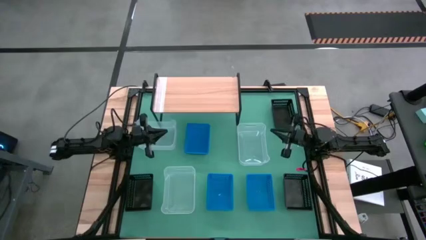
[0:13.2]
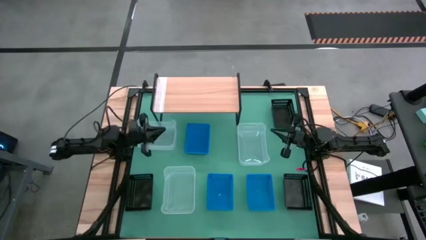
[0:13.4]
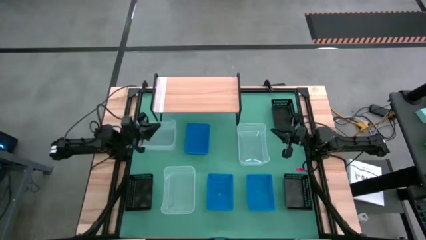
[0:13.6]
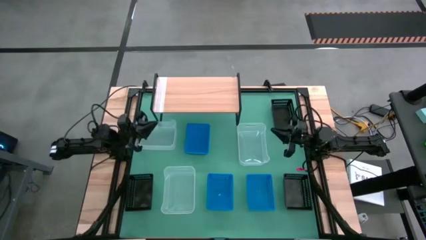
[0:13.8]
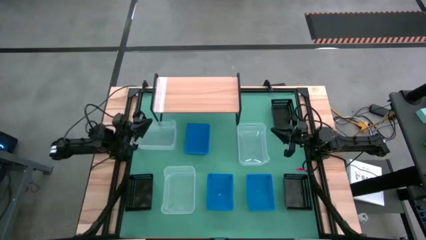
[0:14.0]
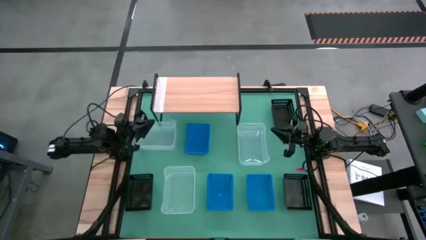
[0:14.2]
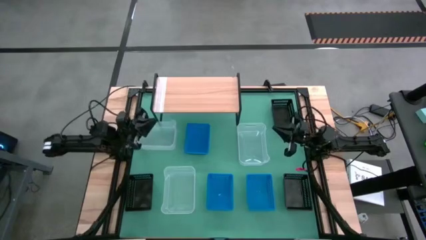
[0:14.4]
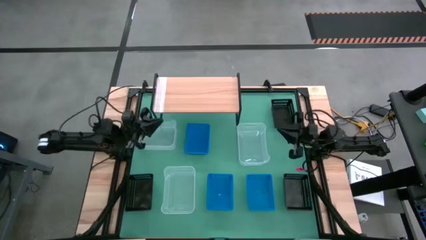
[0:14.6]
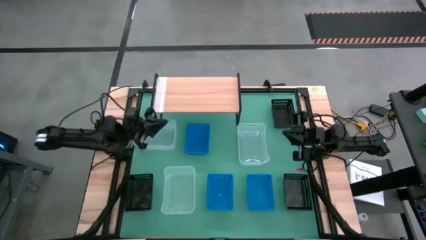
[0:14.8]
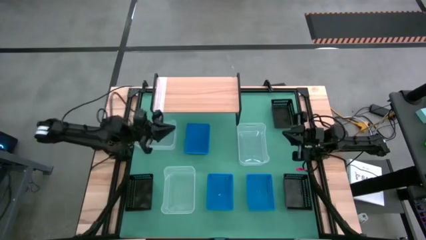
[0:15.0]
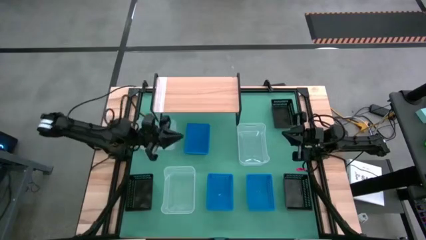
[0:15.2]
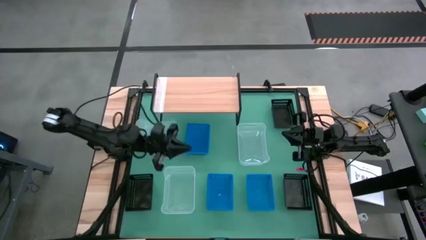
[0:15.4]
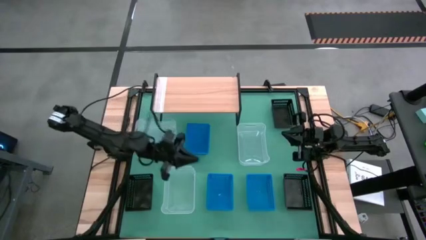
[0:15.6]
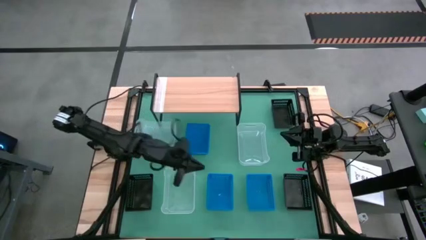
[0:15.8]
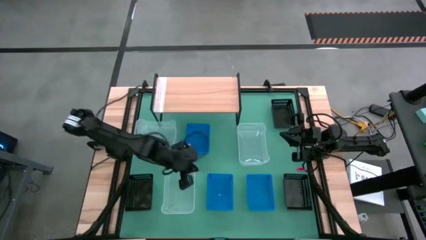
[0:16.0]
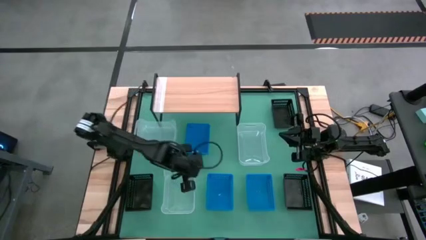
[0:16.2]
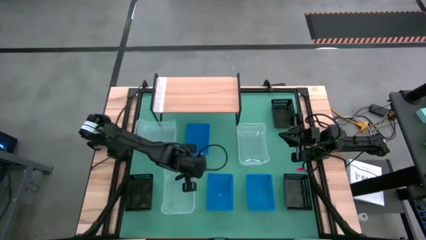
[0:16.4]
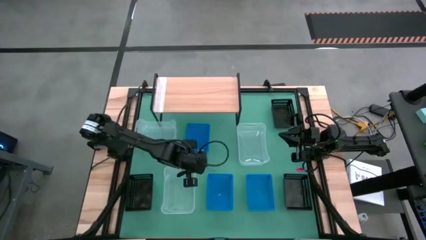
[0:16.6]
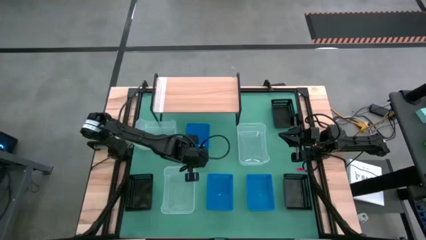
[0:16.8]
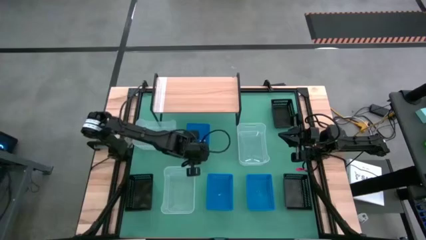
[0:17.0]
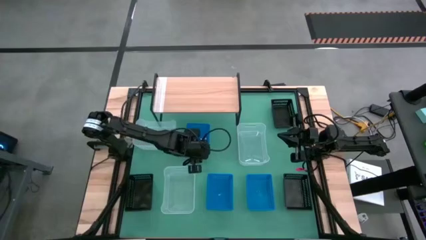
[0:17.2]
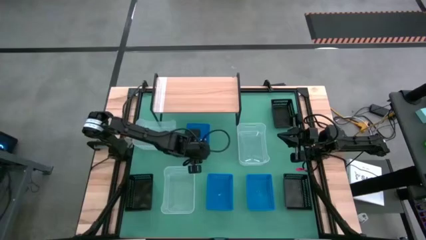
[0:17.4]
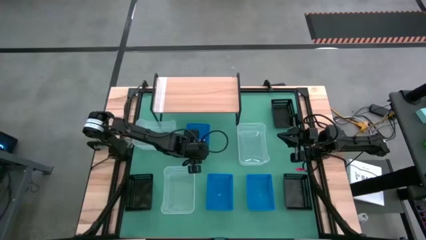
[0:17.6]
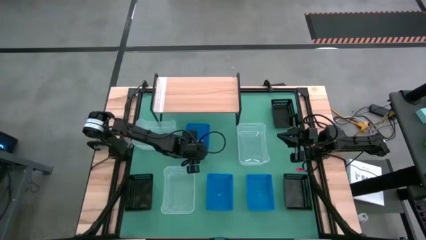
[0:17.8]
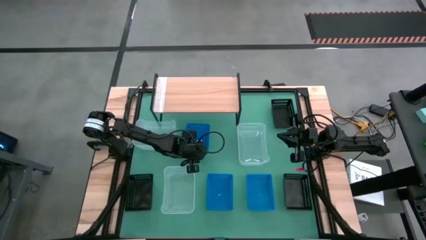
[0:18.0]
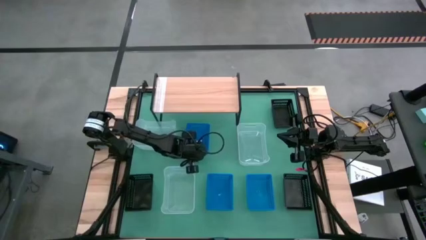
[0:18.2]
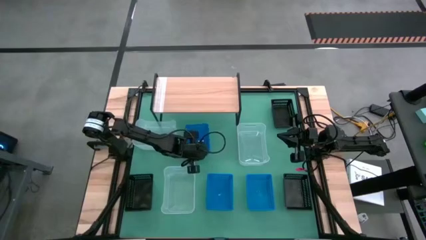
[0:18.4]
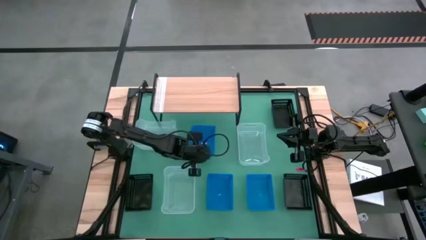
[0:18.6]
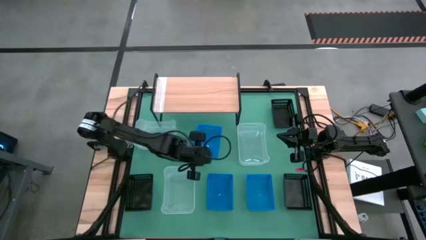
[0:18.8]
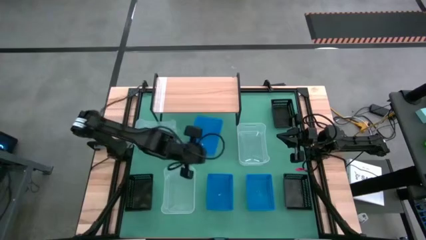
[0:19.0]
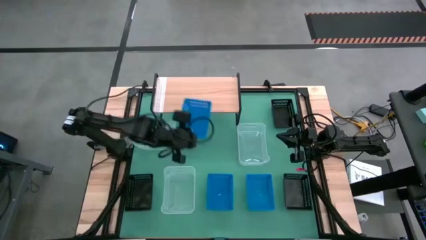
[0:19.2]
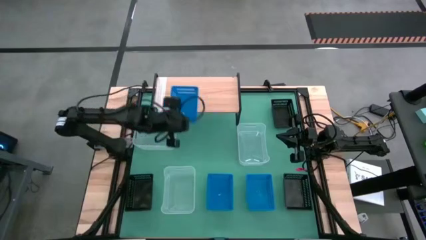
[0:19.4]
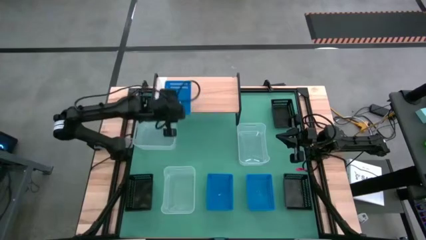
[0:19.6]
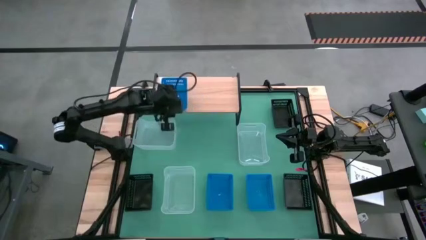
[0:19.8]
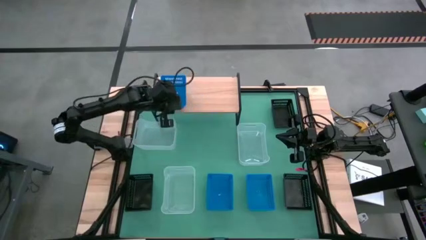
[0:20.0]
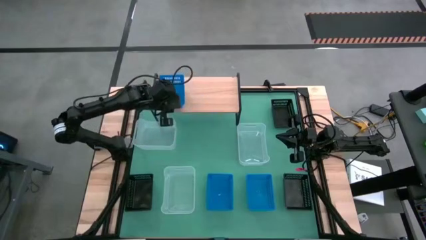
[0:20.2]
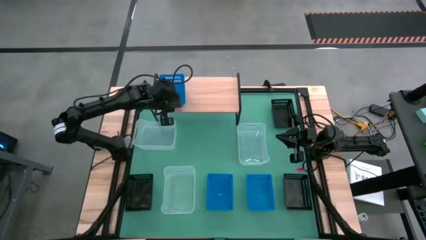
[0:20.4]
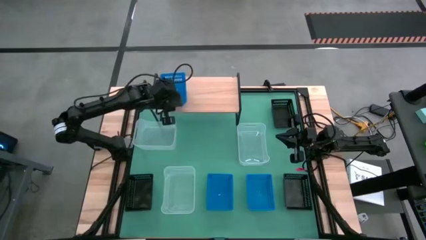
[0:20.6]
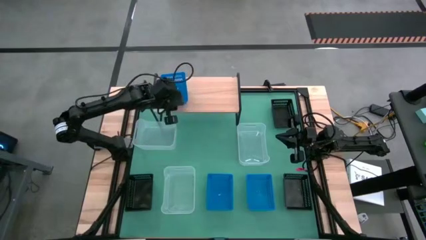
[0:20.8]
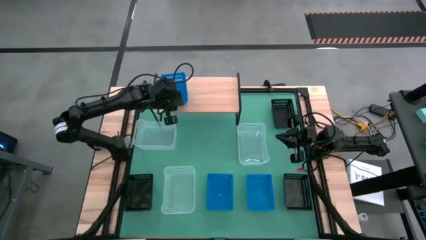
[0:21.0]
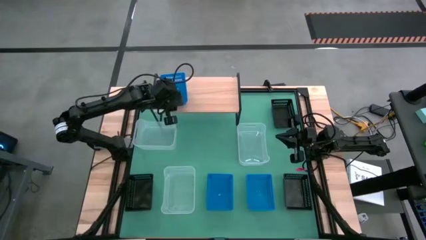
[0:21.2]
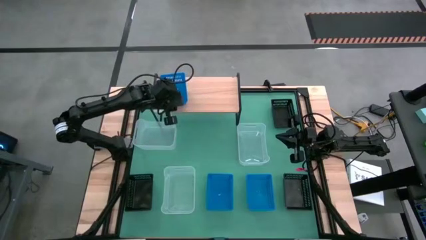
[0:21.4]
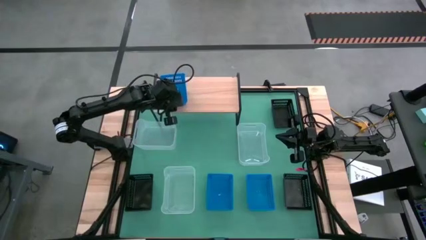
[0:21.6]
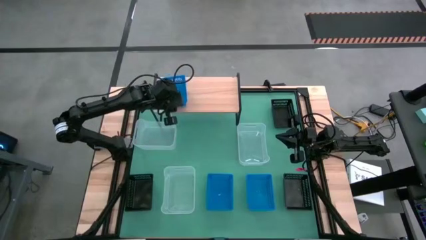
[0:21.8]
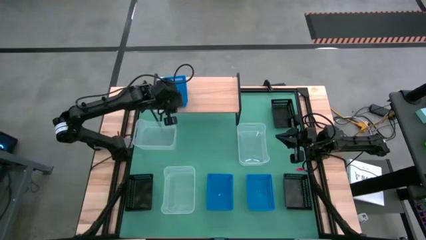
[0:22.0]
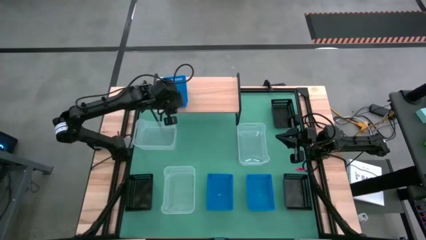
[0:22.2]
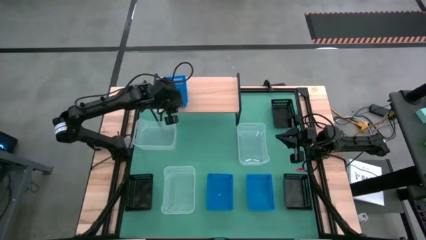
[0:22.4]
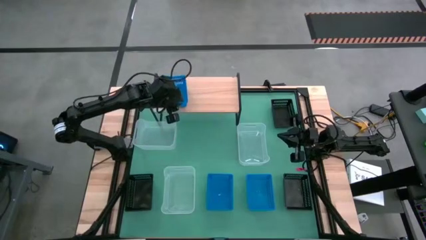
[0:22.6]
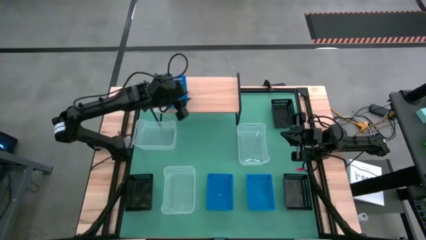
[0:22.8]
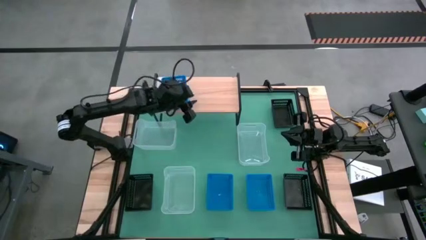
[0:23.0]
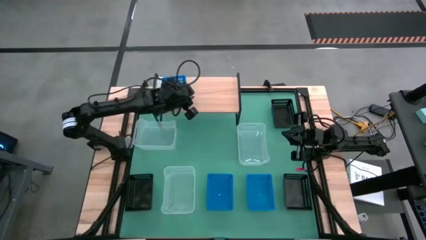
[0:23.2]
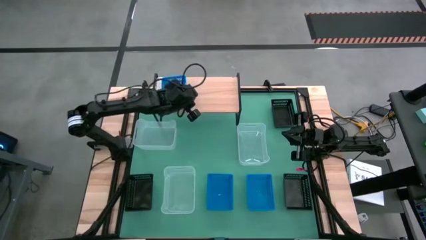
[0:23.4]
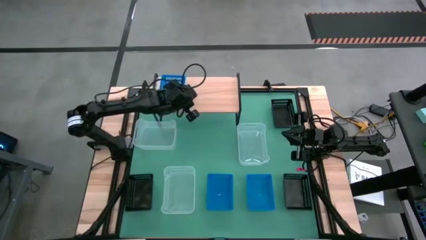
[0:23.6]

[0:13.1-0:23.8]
Task: Stack baskets on shelf by color
Put the top blue bin on the shelf

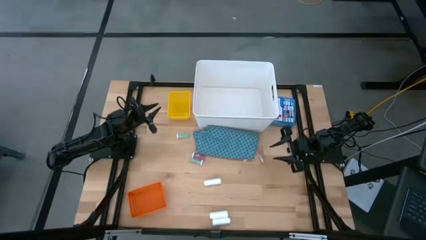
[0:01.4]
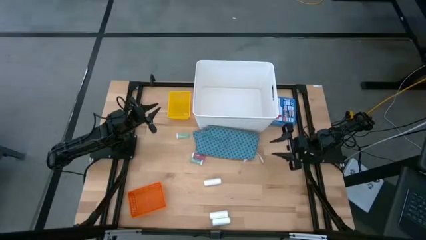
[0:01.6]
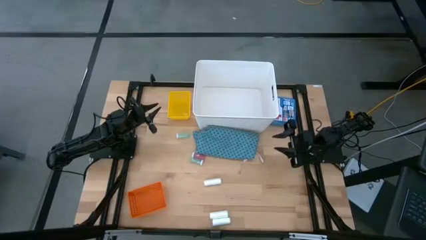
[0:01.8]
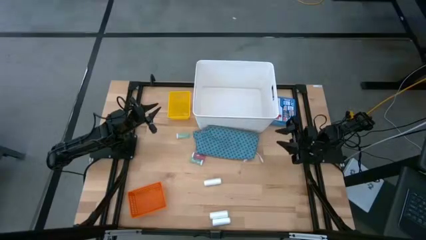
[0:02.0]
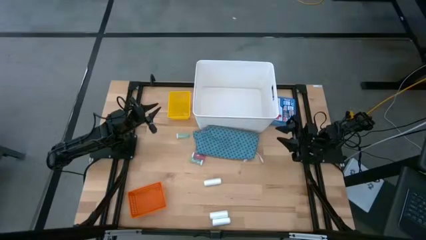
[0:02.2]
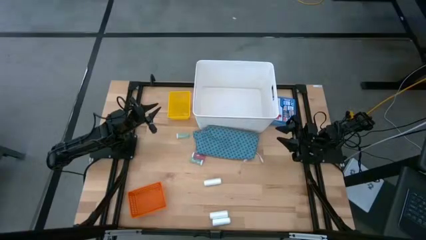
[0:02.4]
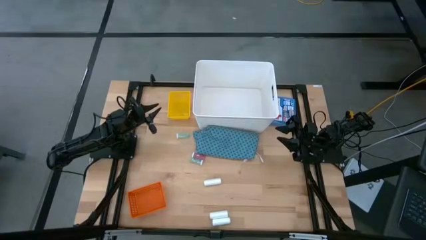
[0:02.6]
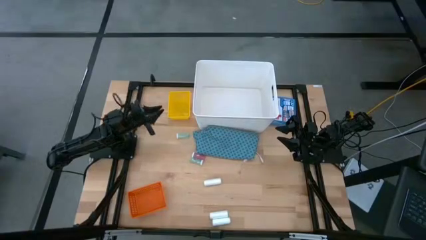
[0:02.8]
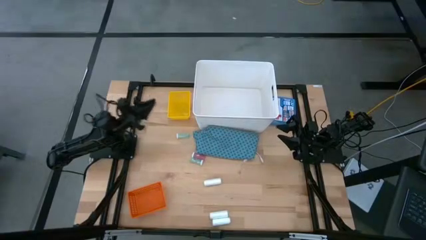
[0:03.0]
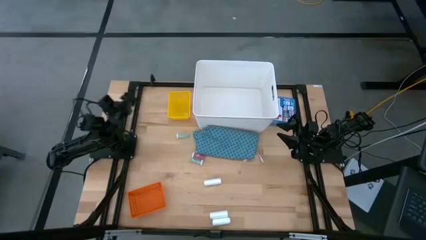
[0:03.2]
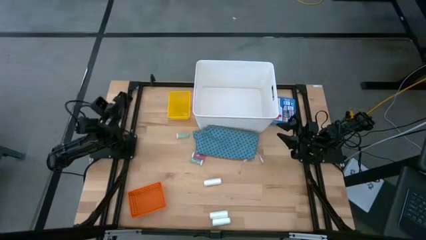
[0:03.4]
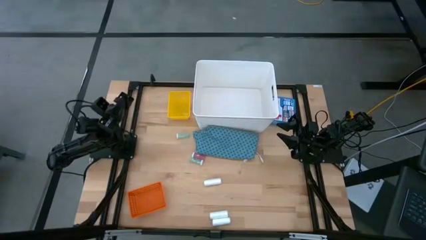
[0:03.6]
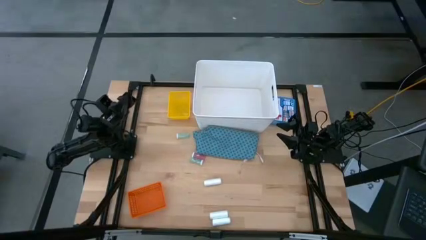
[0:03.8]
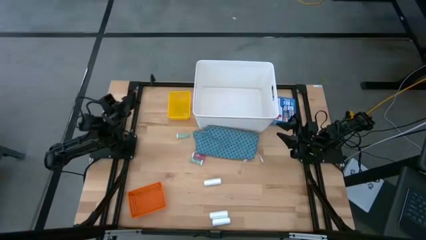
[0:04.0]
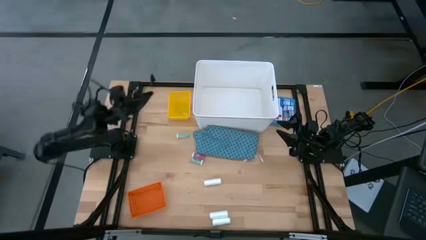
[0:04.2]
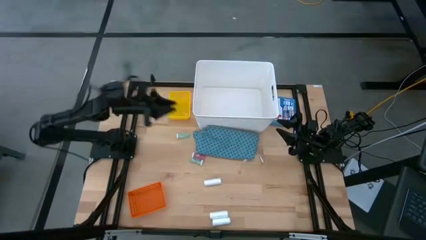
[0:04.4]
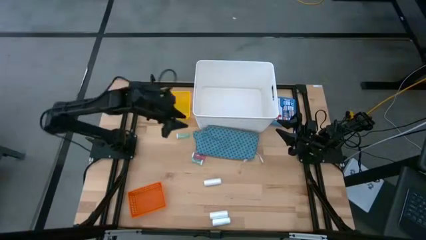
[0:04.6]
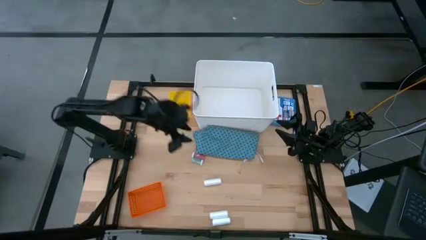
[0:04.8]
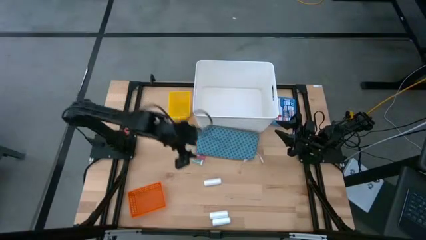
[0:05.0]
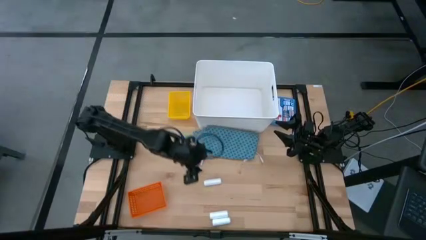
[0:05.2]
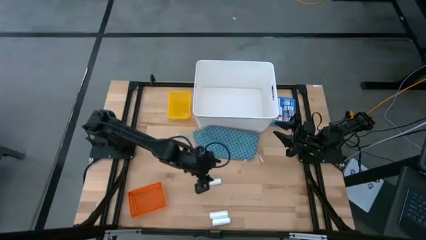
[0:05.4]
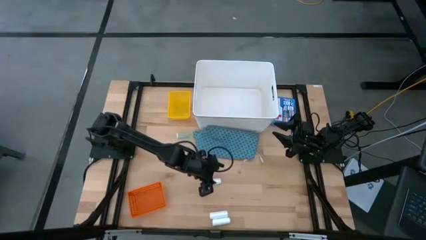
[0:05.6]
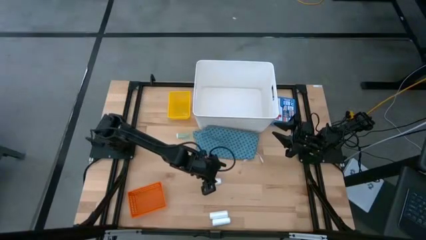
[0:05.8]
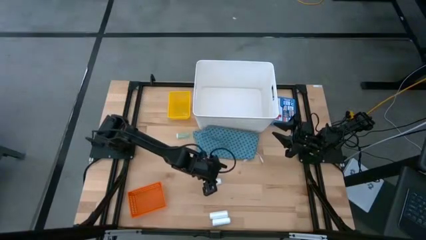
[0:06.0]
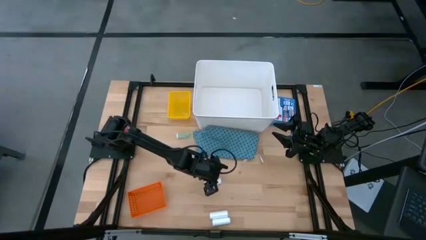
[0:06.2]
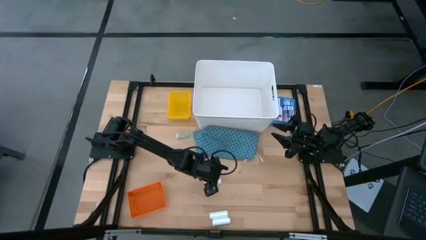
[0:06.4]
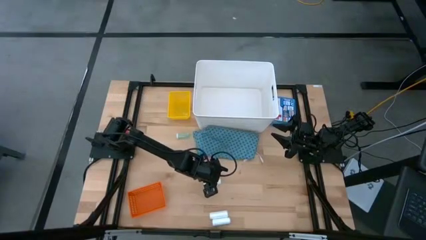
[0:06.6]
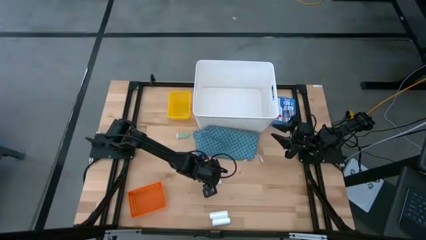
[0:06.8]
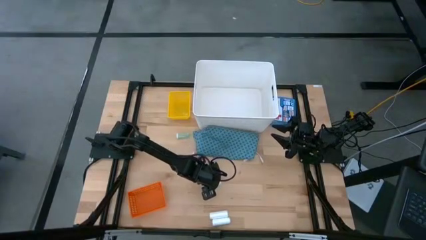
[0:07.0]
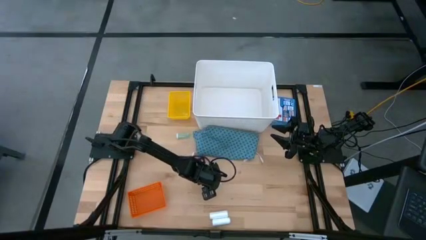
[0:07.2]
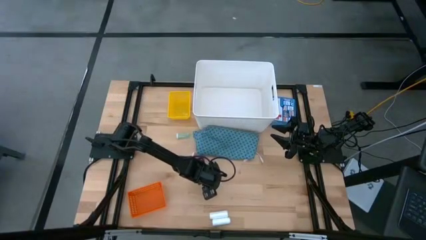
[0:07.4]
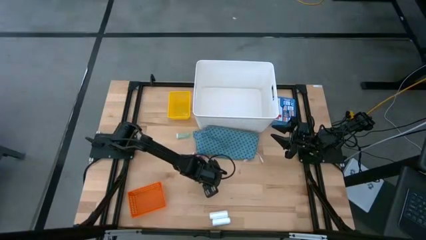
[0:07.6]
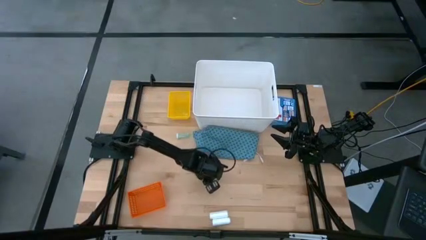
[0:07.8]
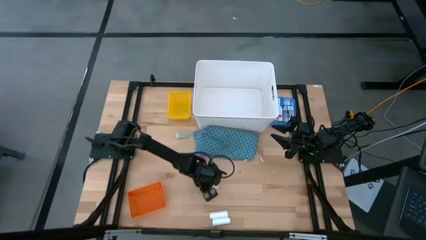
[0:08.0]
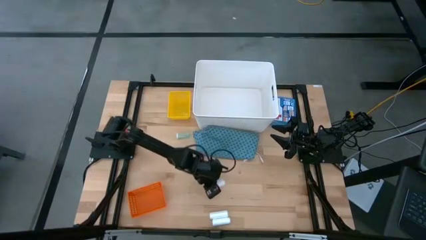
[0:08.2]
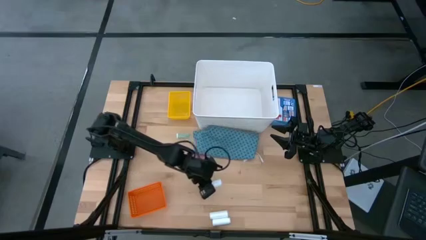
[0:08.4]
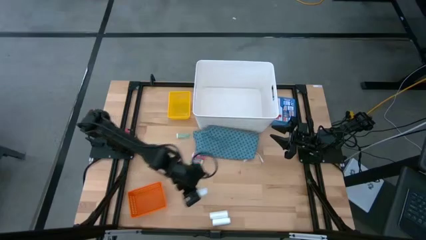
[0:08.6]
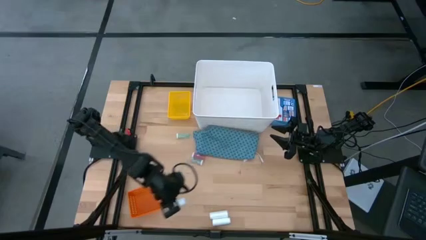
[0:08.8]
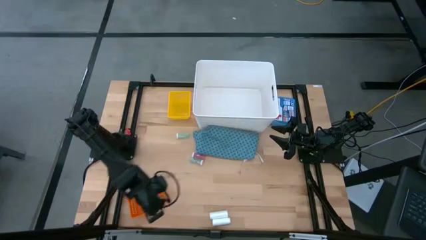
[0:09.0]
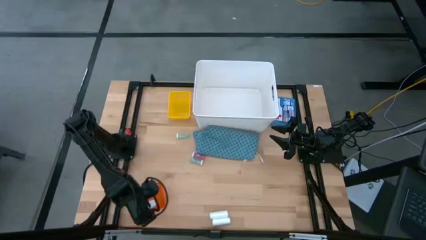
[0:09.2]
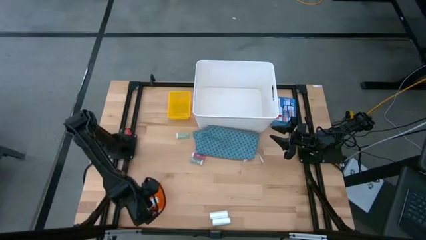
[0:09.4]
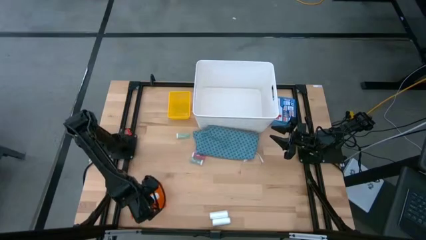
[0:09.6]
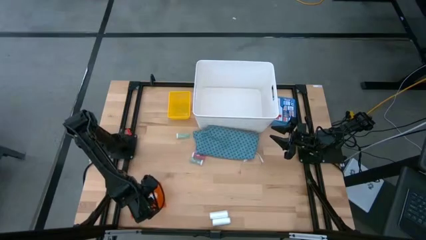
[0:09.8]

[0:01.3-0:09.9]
Task: Pick & place medical supplies in basket/bin
Put the top white gauze into the orange bin
